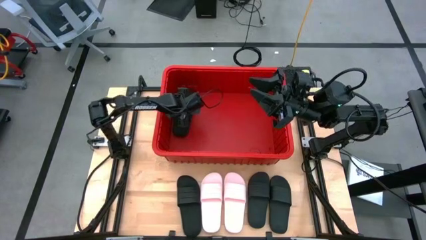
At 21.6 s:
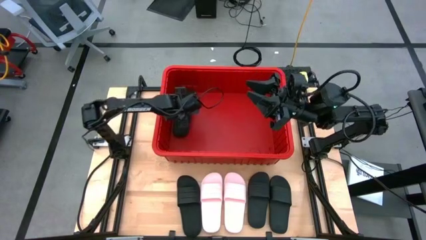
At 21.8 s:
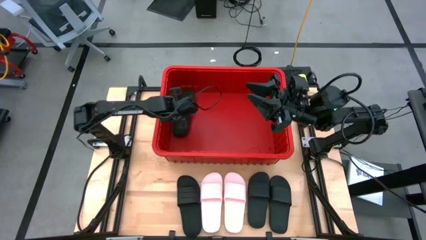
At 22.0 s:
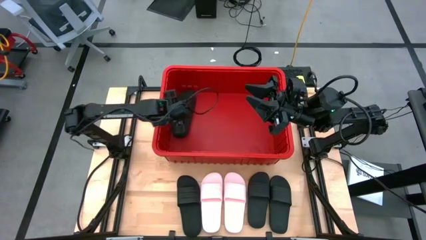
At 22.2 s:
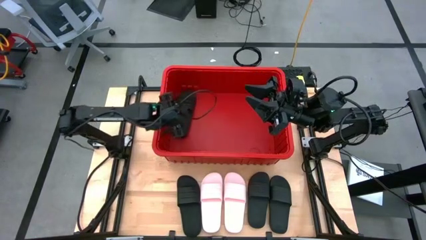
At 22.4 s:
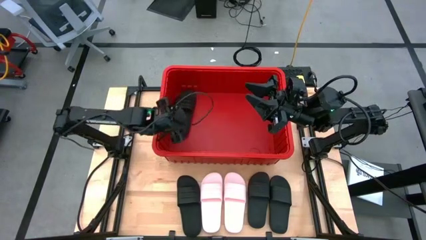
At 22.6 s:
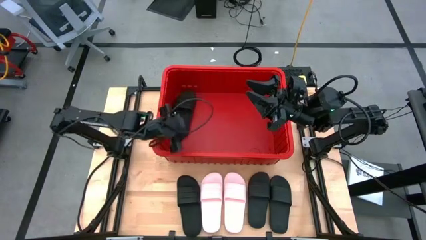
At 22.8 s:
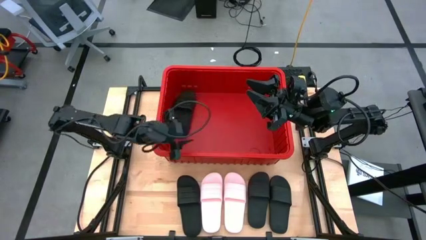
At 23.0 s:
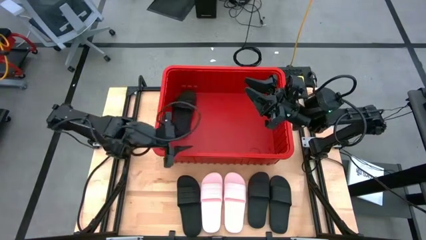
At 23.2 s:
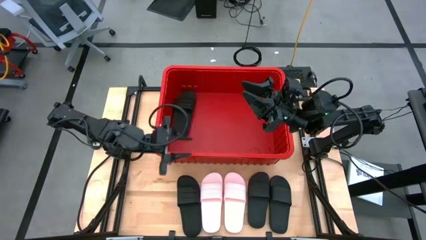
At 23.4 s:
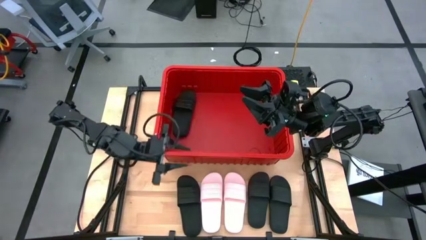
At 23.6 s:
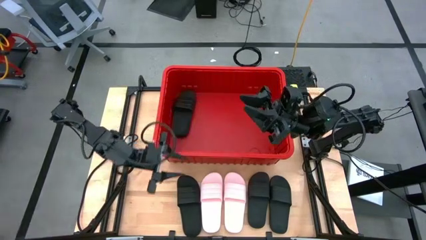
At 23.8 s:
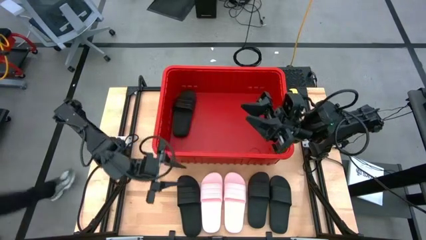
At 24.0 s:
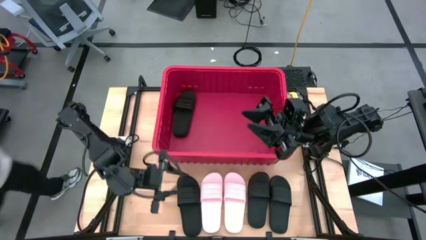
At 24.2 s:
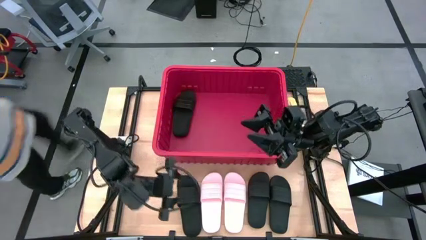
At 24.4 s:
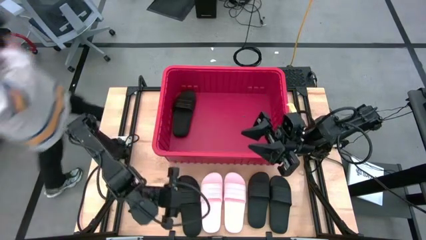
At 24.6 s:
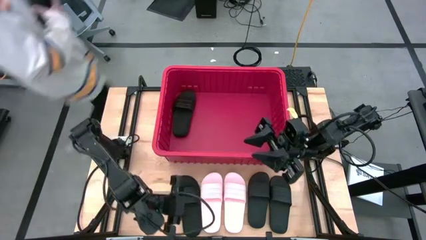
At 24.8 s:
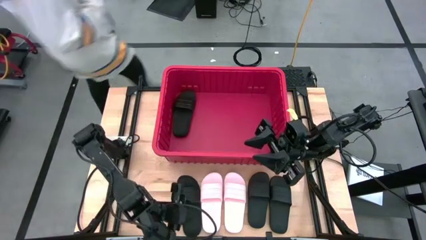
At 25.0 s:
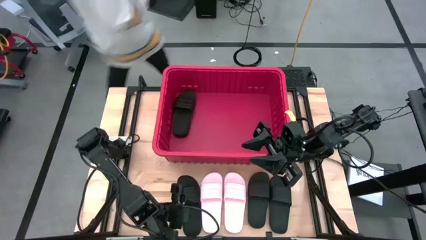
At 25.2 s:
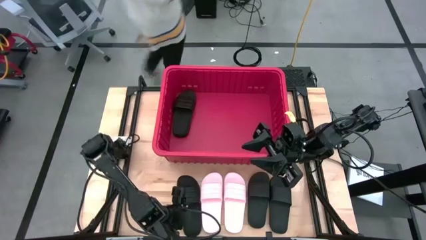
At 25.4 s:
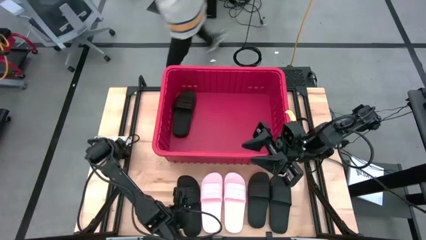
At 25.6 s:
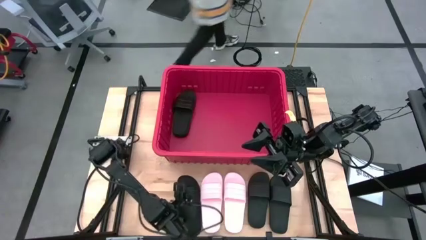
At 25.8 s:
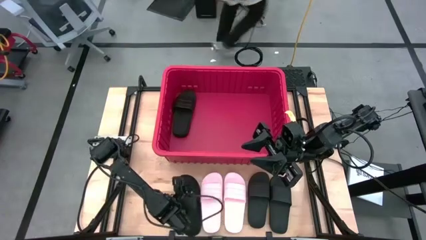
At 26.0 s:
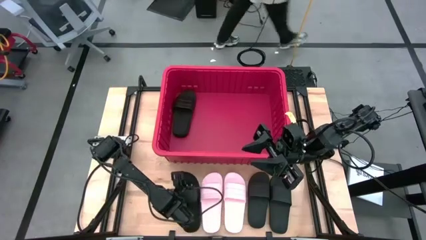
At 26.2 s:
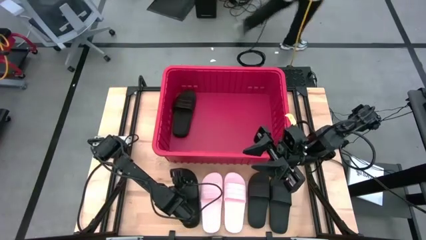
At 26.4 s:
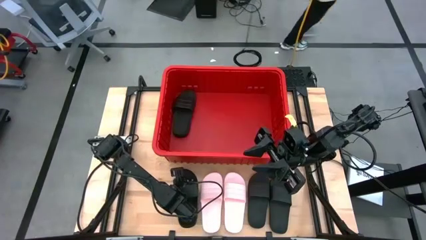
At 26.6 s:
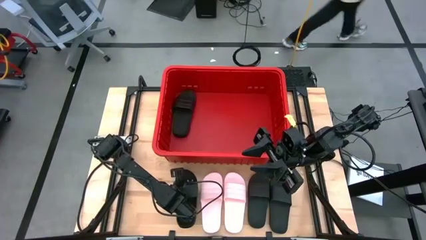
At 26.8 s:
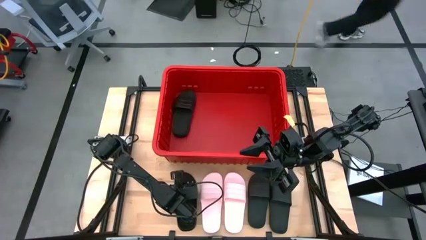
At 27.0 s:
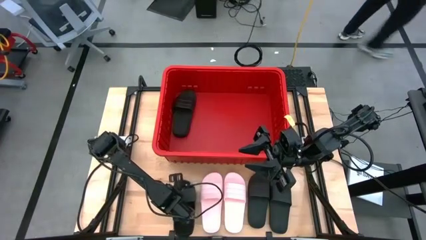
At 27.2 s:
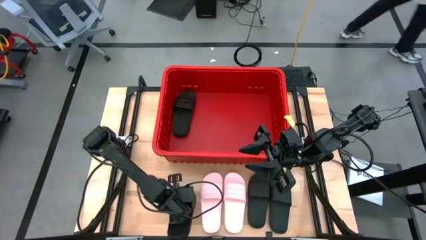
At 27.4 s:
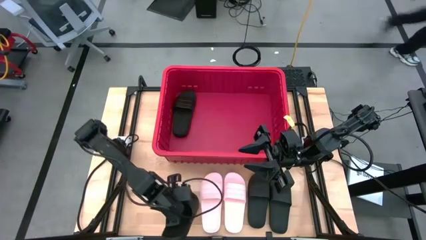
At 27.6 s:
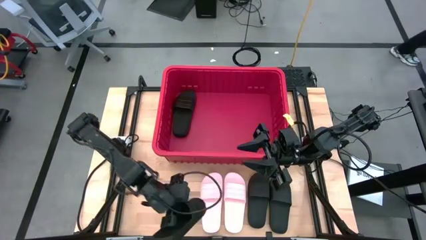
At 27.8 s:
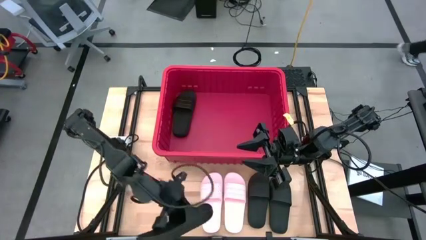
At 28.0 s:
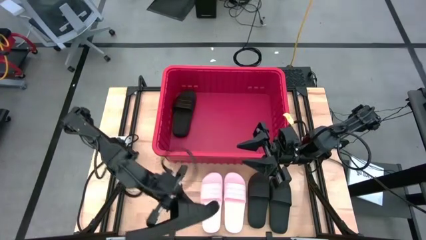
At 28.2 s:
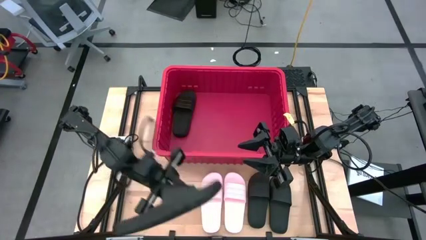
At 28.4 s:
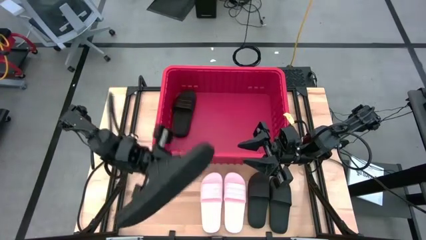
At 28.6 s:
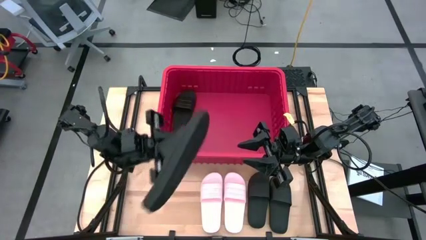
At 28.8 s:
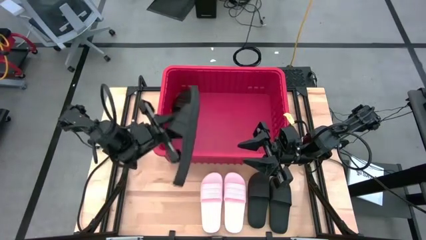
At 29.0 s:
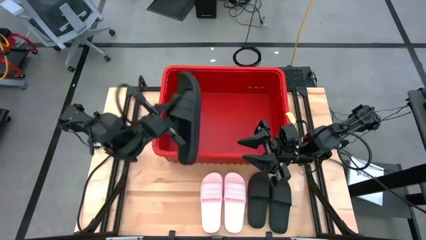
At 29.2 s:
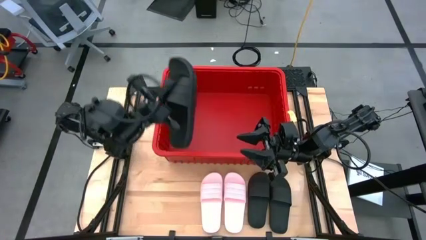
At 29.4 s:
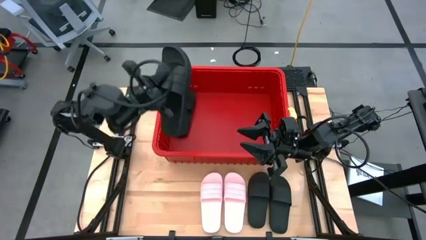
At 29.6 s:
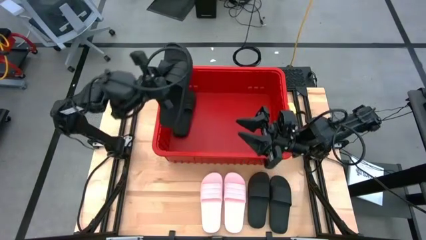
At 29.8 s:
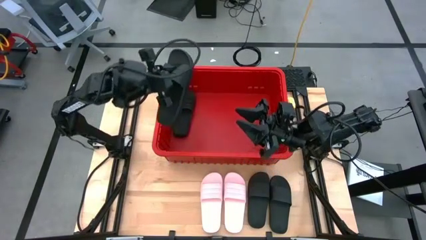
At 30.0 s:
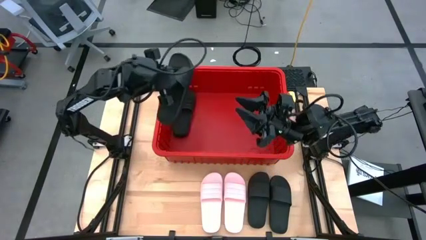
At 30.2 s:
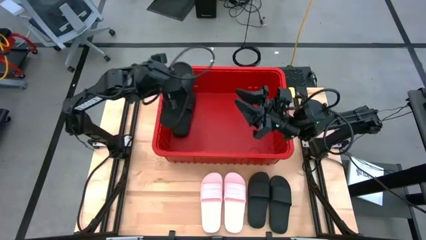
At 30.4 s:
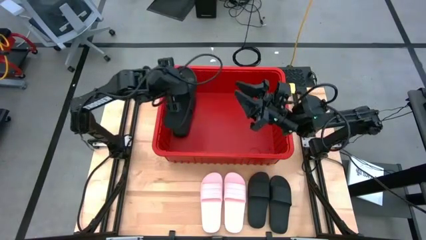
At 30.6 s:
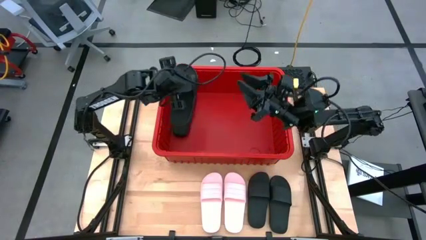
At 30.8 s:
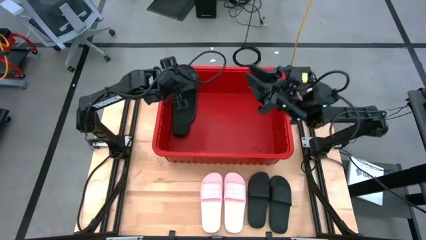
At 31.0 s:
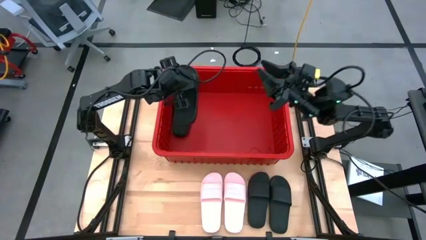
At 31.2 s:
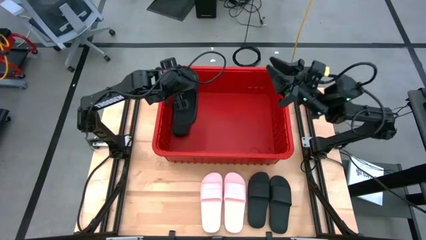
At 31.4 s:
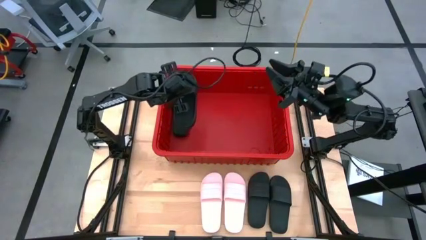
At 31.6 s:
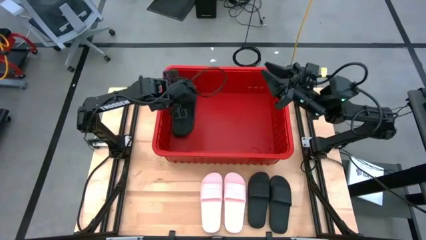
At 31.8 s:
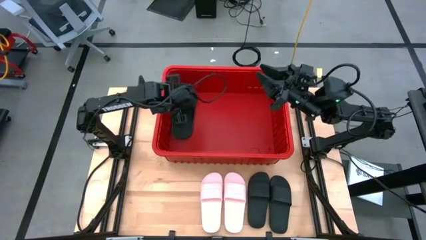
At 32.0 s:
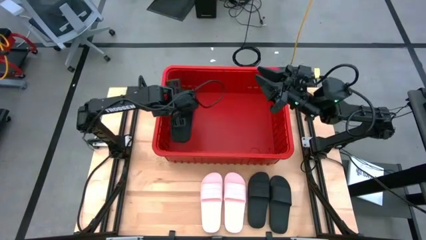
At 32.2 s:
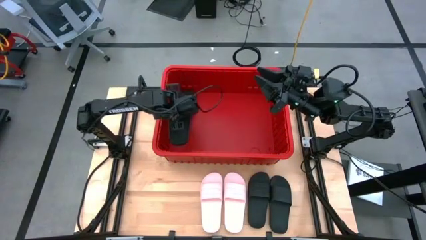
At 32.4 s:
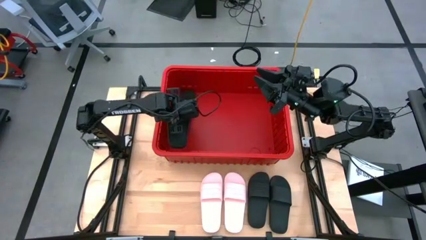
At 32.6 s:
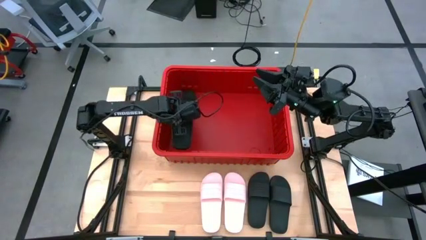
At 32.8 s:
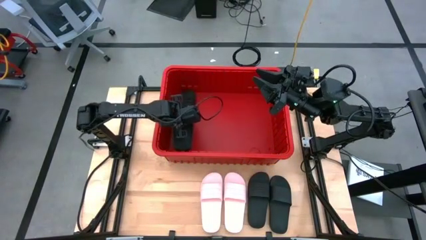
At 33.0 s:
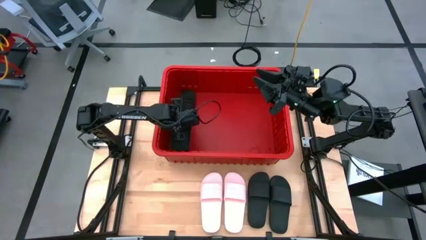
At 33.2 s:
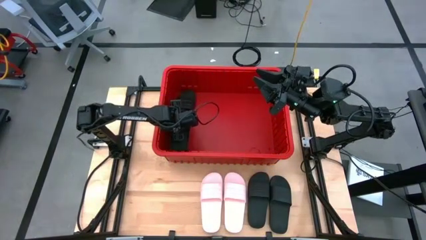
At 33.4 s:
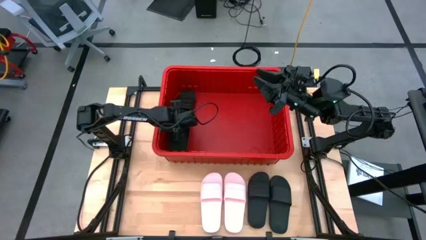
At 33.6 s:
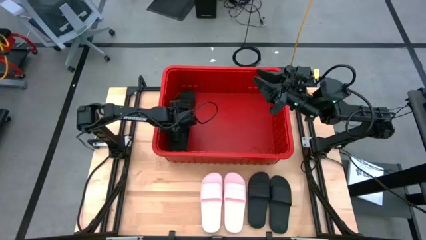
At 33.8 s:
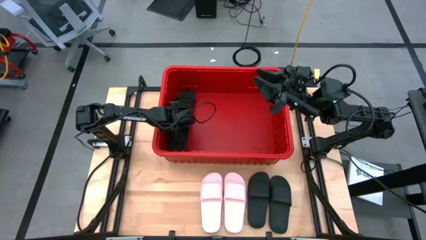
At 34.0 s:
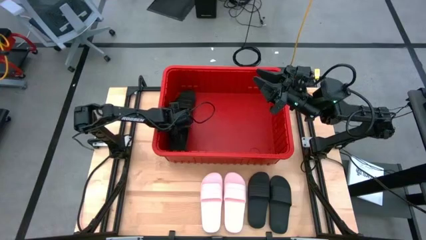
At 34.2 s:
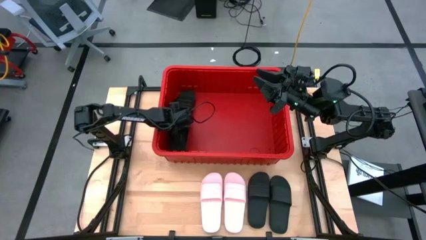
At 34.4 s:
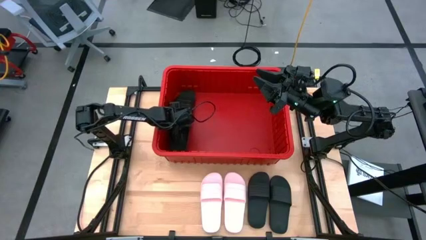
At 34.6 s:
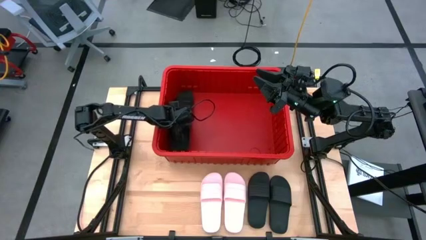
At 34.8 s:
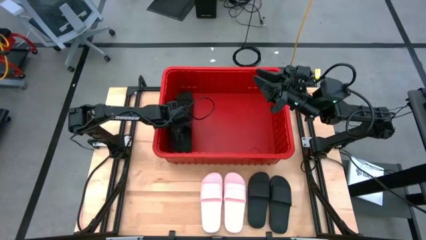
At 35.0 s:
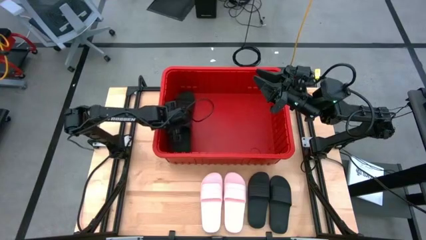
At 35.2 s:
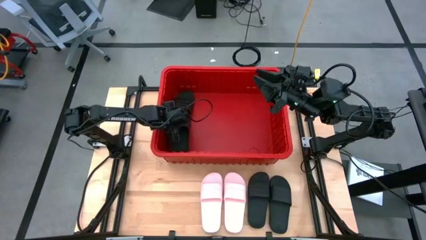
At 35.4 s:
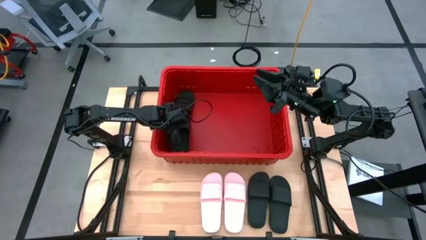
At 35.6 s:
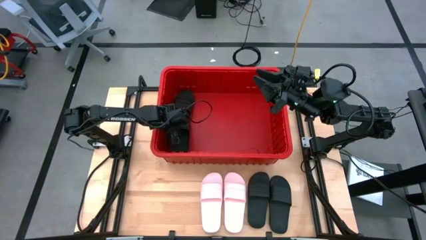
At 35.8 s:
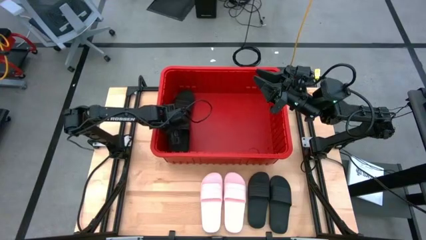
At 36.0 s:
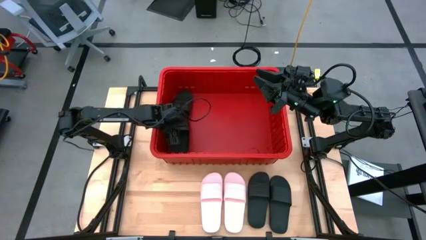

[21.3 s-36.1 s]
Task: Pick and place slides into bin
Put the black slide into the red bin
